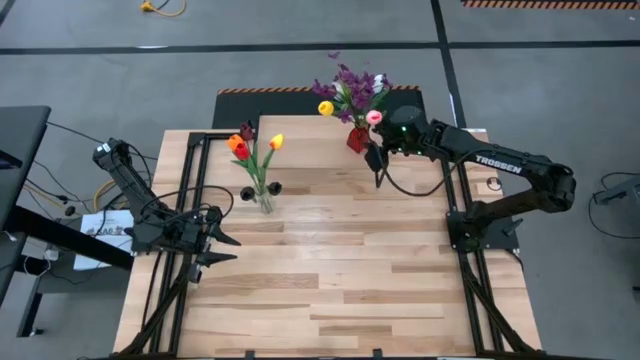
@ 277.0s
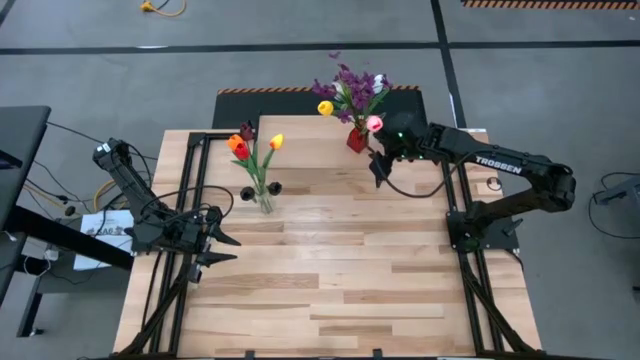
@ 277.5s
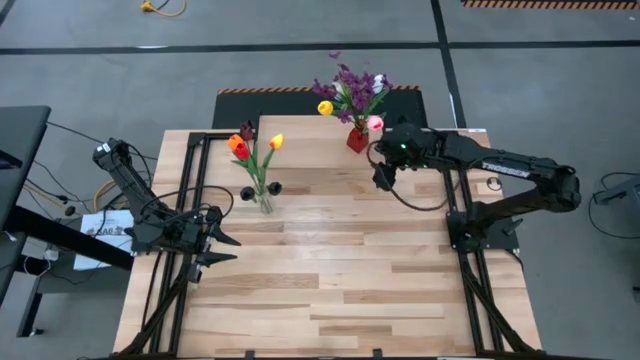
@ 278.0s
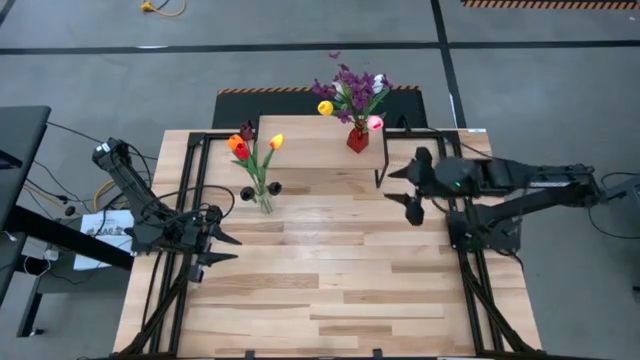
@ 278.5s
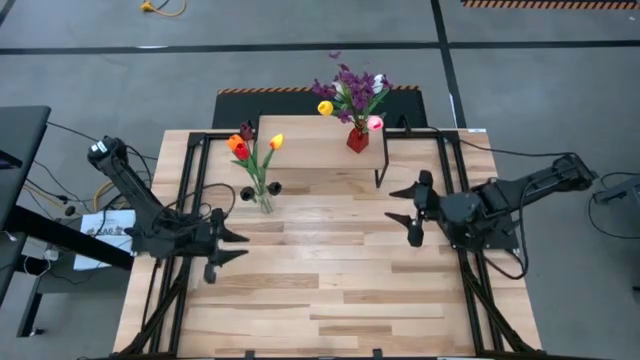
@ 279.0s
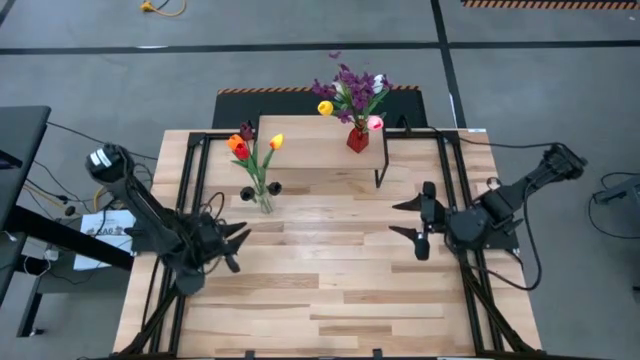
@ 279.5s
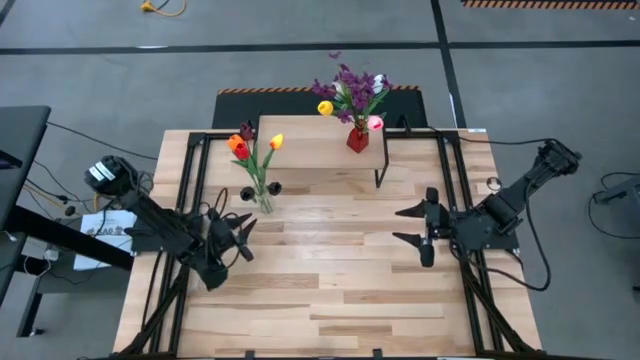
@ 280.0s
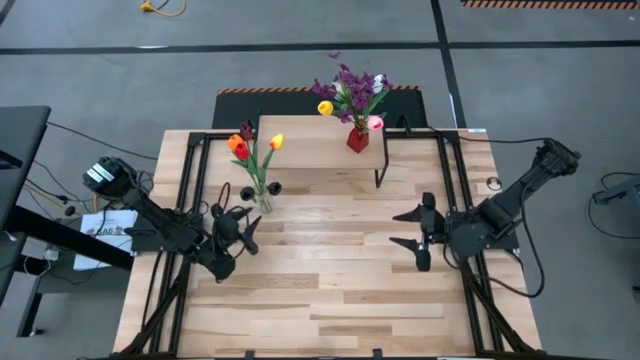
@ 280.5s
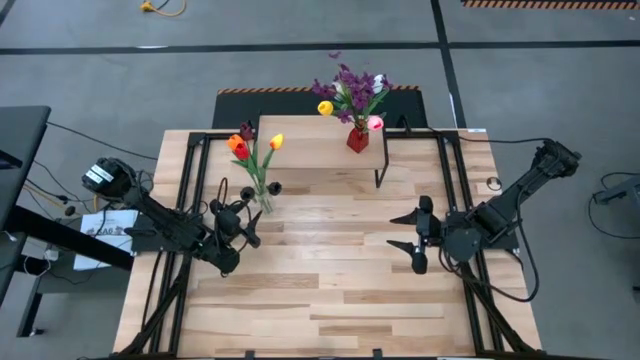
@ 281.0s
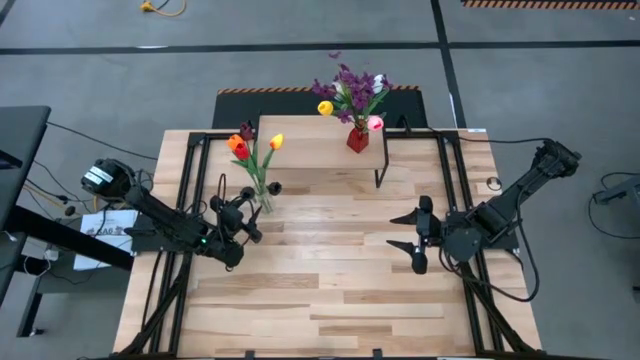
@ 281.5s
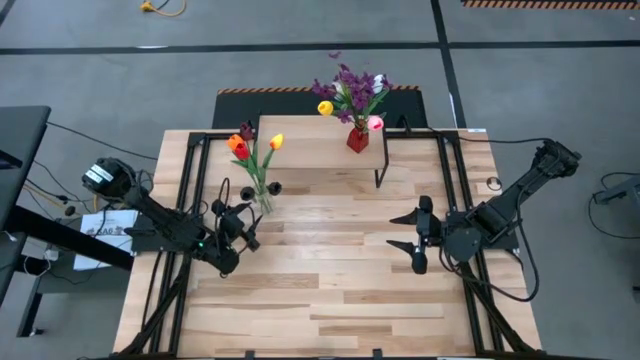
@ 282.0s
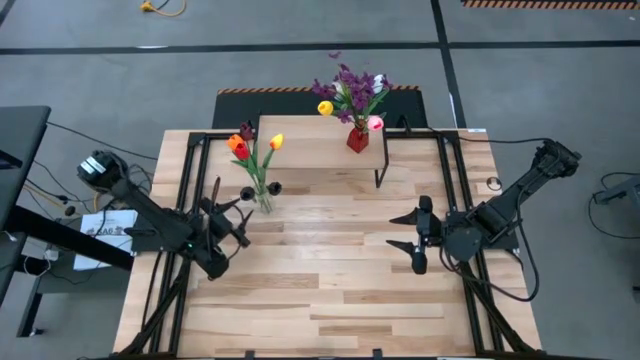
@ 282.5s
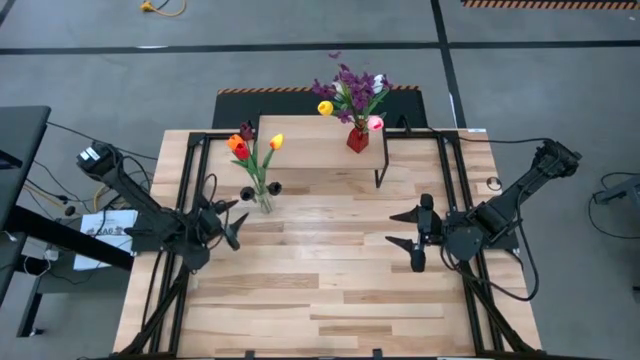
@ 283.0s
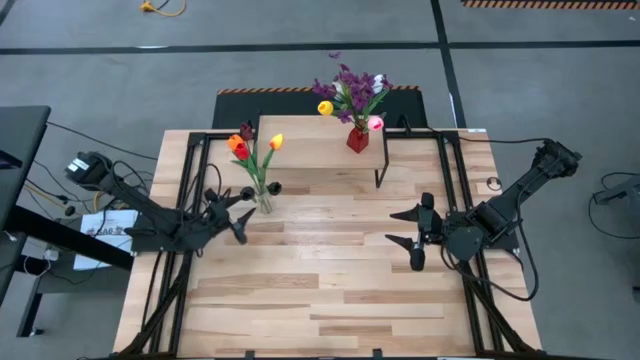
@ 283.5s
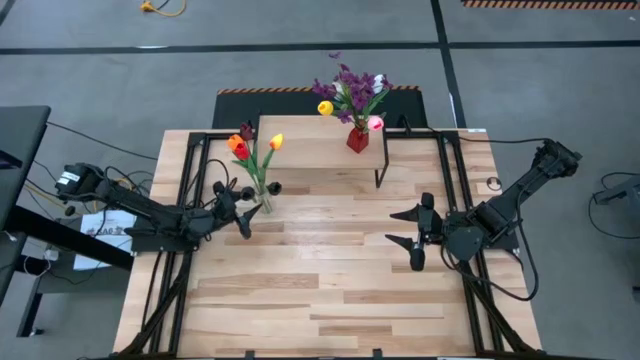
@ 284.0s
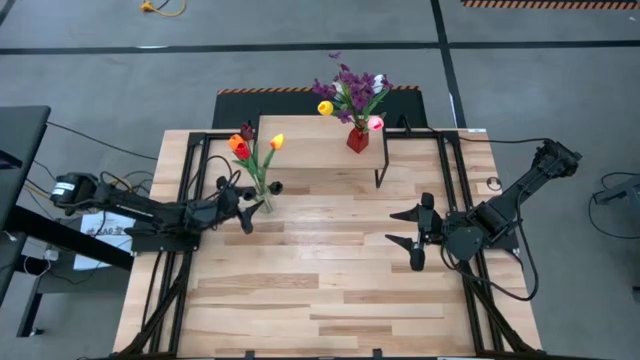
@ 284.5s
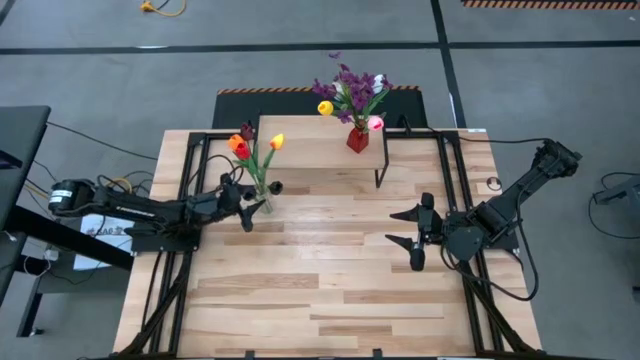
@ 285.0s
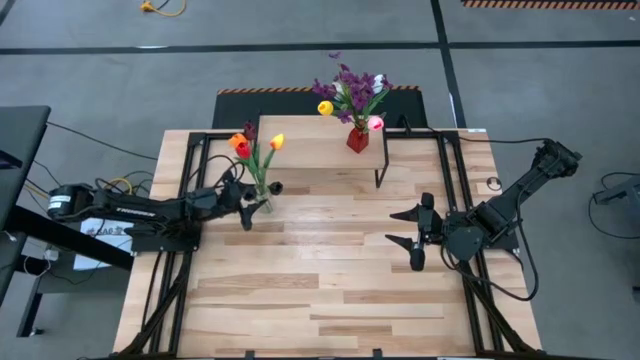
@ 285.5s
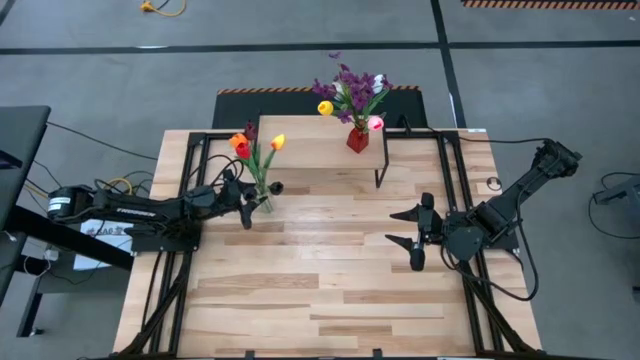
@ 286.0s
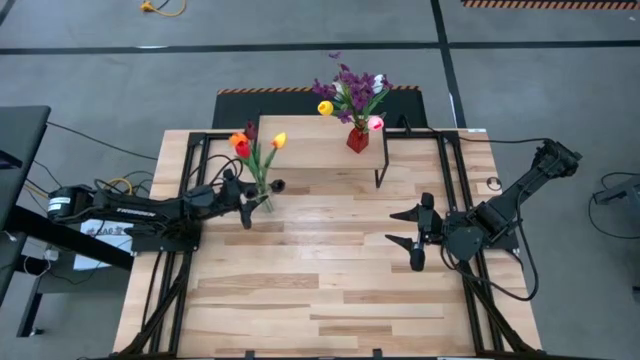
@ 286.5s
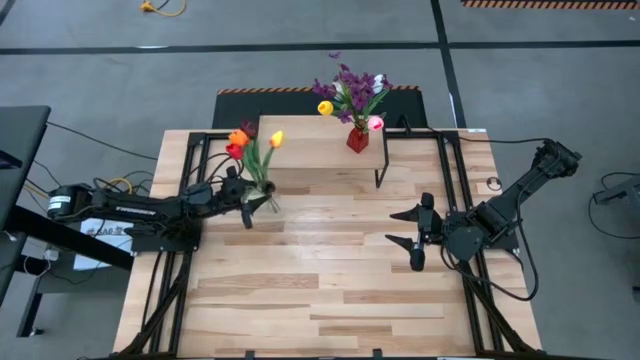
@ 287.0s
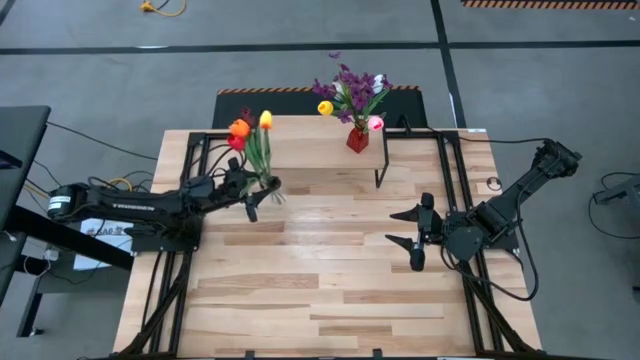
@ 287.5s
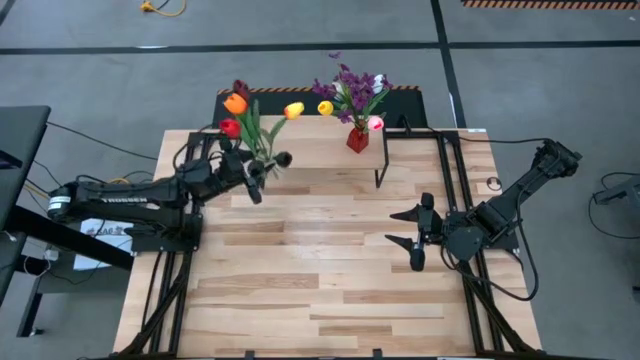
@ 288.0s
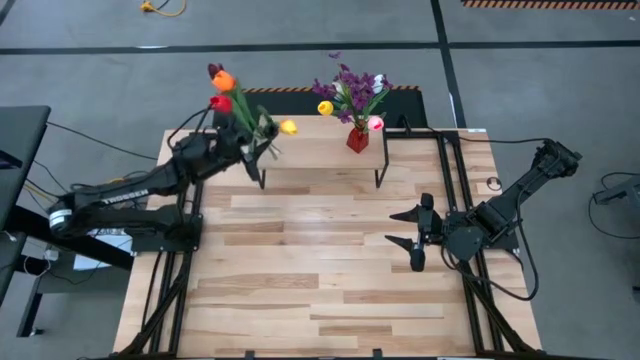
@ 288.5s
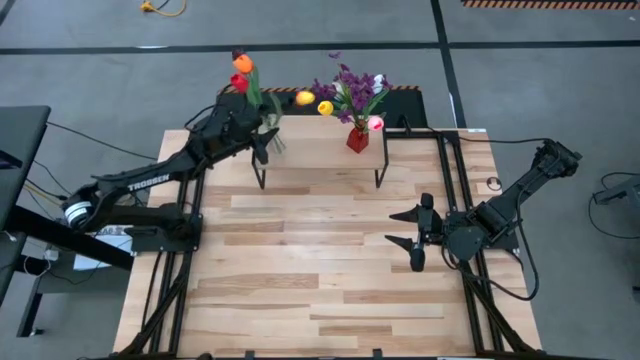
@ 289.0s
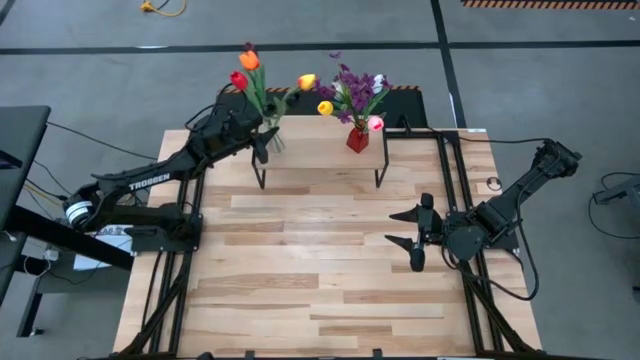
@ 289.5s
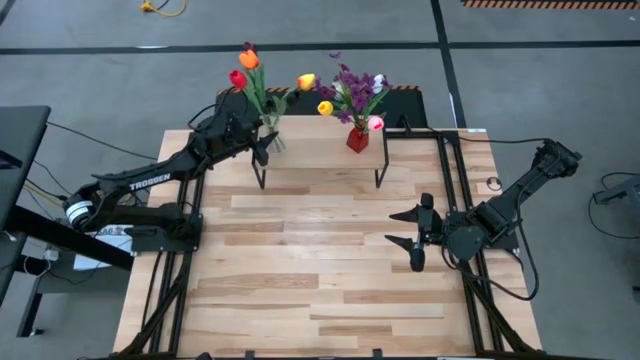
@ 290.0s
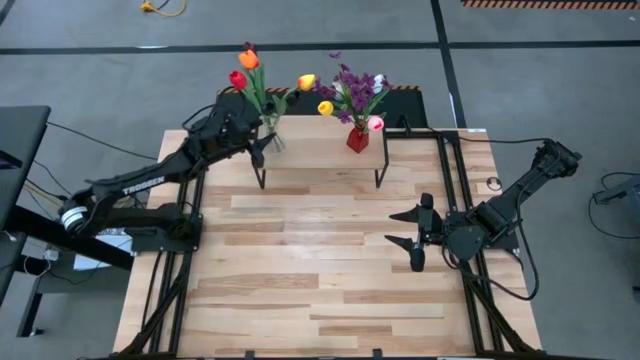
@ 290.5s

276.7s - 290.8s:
Task: Pick and place flowers into a vace then onto a shelf
Put the transparent vase with flowers on the shelf

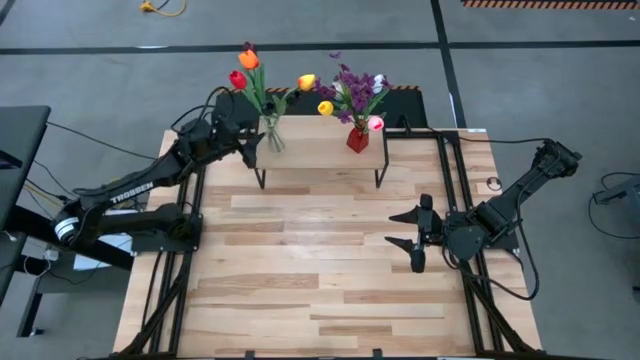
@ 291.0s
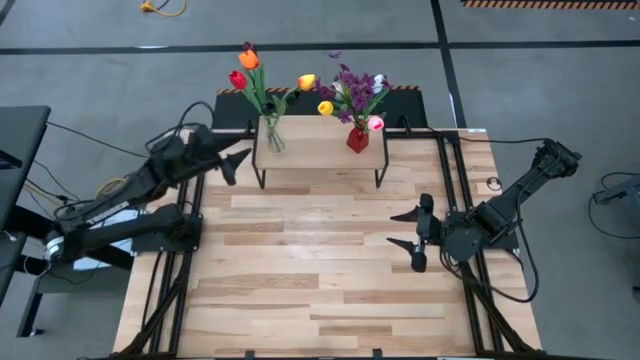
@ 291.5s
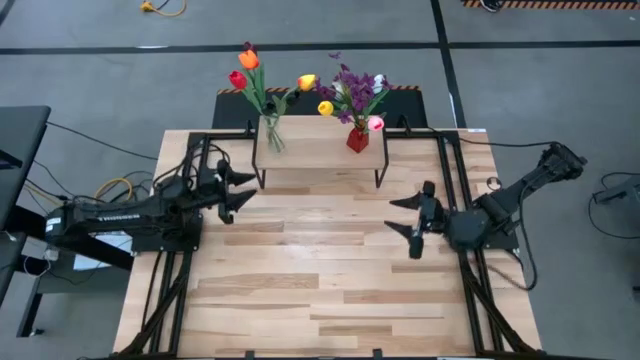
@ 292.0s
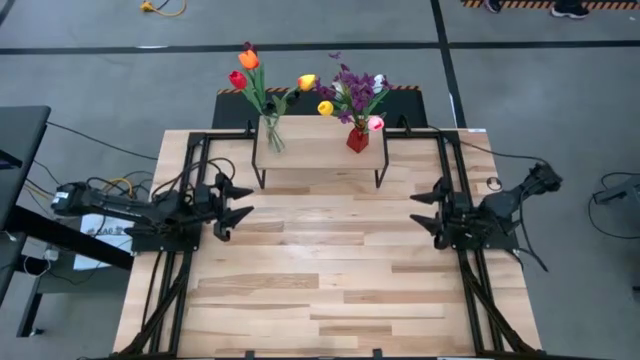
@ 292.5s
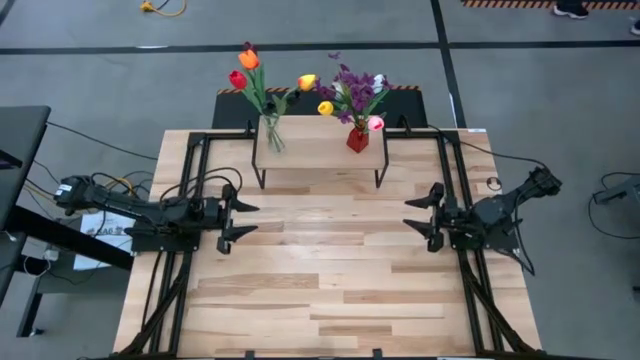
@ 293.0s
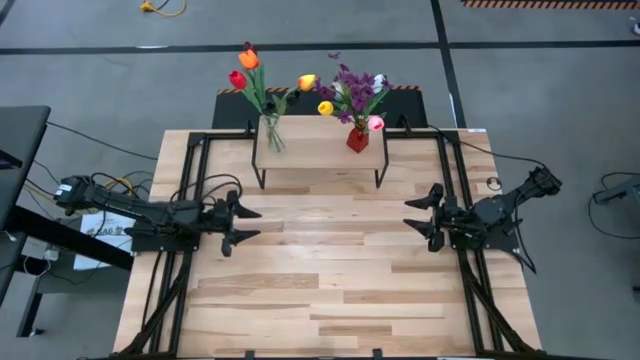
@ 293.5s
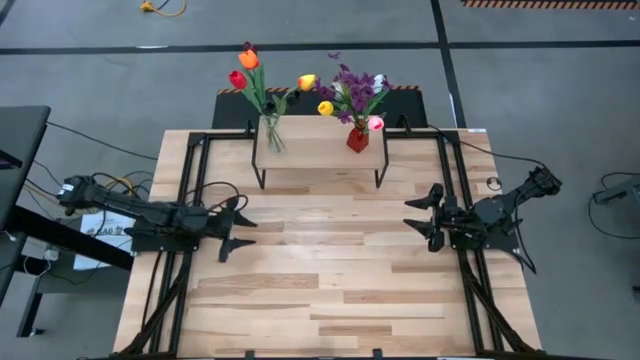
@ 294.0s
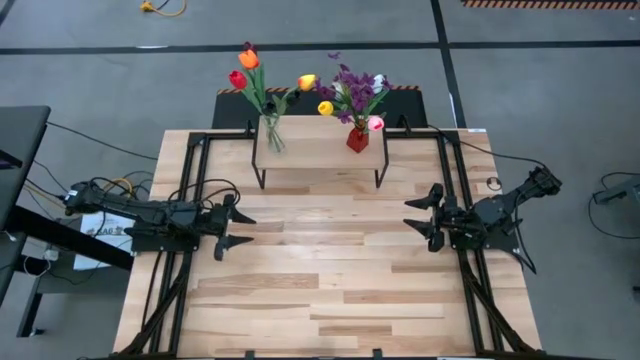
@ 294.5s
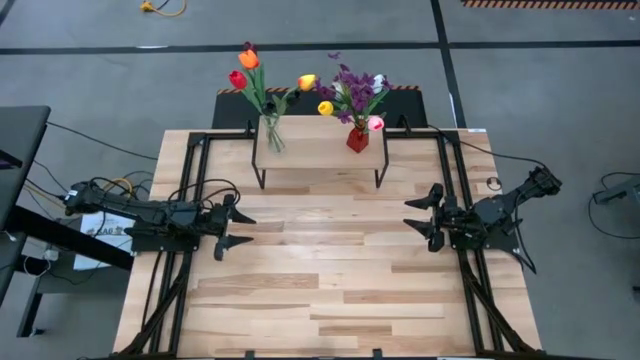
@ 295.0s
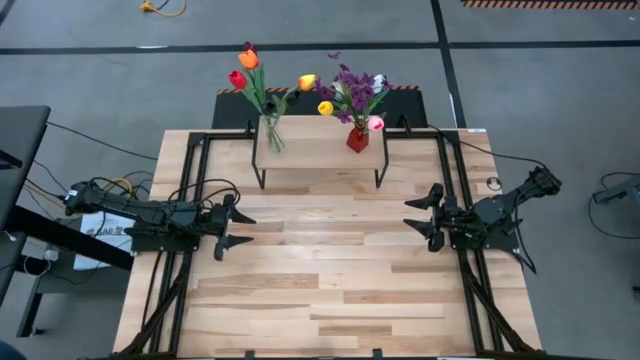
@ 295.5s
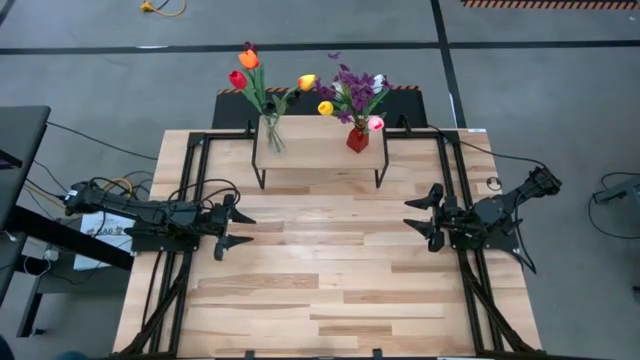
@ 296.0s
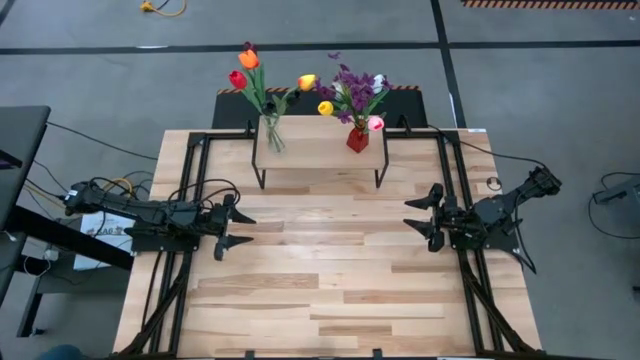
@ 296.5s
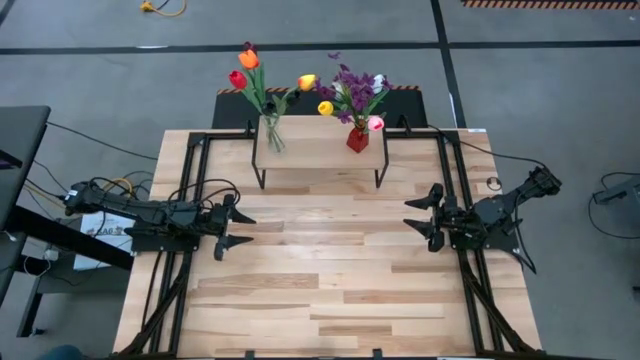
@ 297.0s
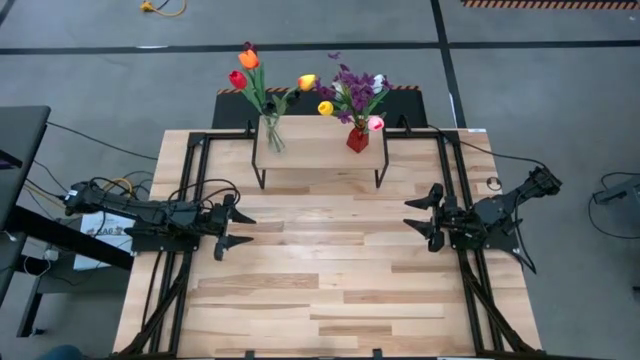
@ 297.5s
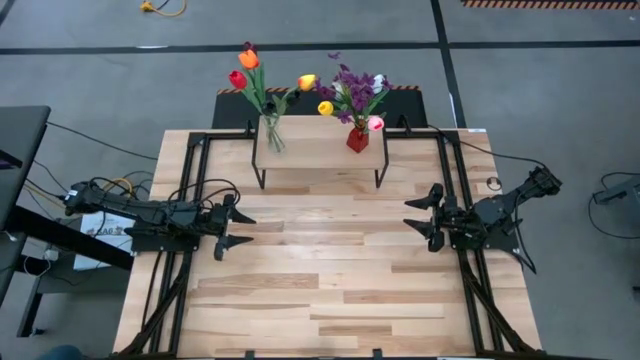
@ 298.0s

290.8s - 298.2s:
Return to Home Position
